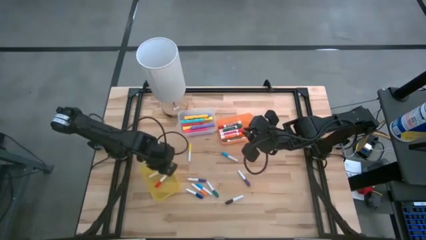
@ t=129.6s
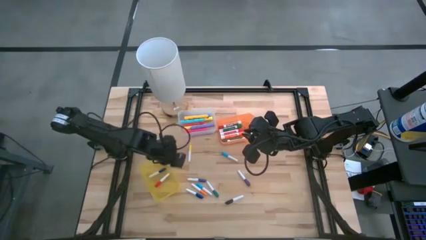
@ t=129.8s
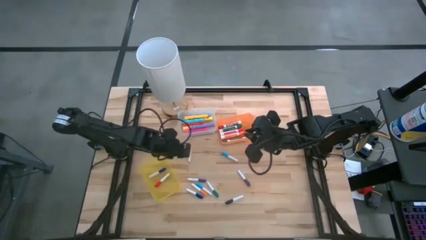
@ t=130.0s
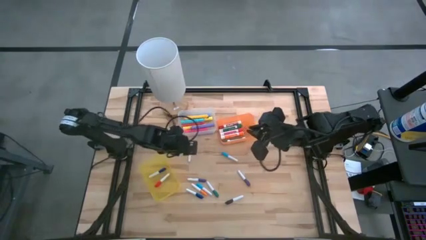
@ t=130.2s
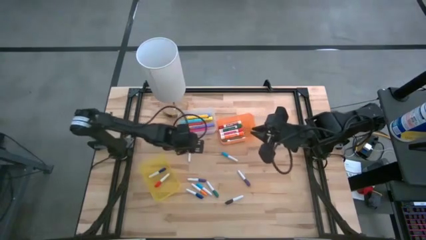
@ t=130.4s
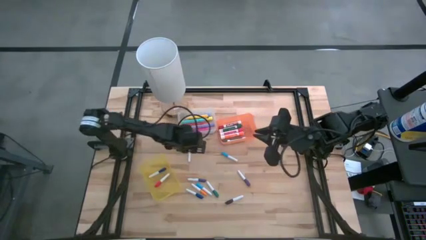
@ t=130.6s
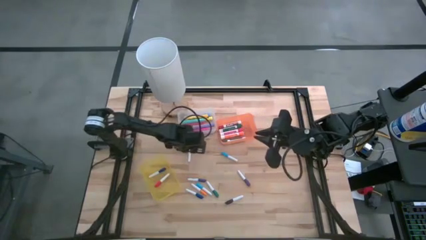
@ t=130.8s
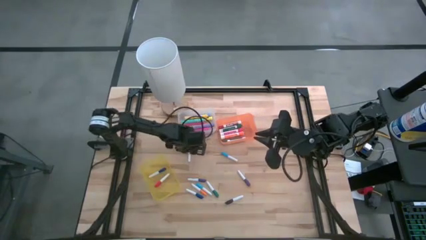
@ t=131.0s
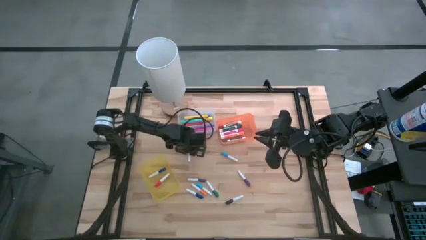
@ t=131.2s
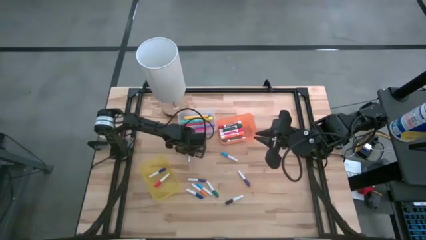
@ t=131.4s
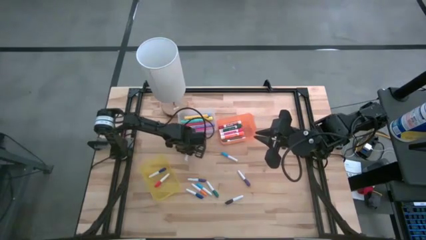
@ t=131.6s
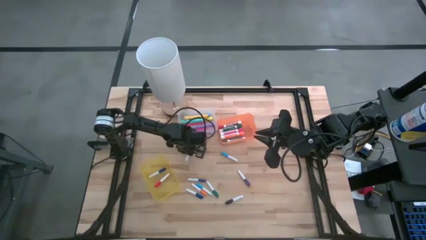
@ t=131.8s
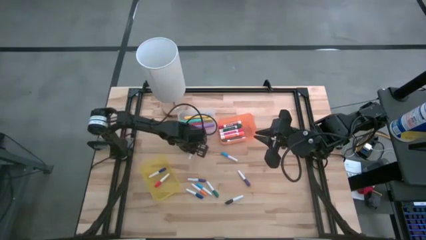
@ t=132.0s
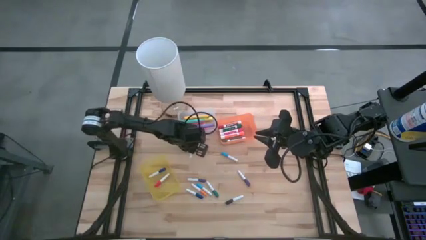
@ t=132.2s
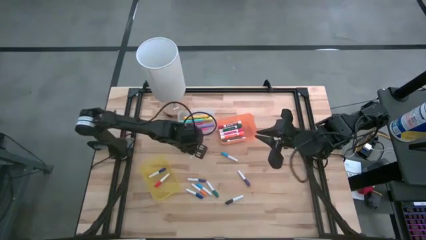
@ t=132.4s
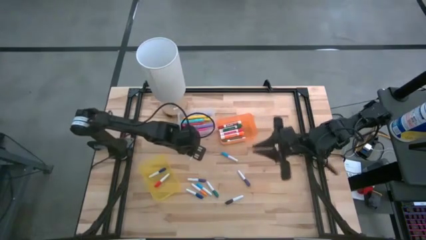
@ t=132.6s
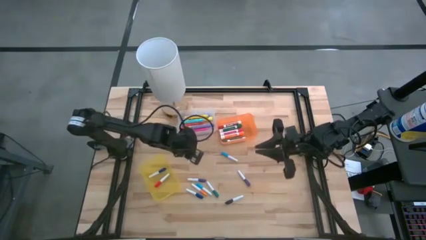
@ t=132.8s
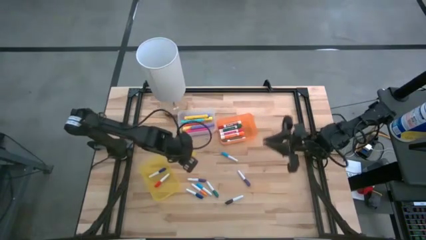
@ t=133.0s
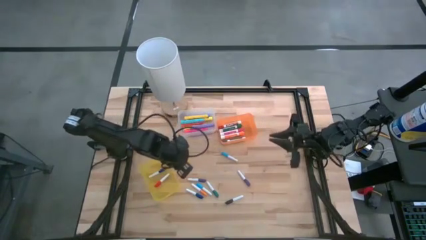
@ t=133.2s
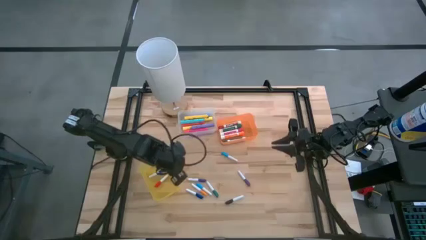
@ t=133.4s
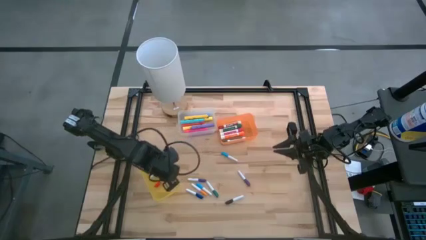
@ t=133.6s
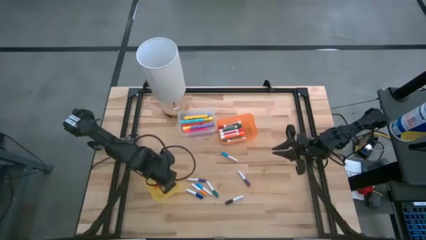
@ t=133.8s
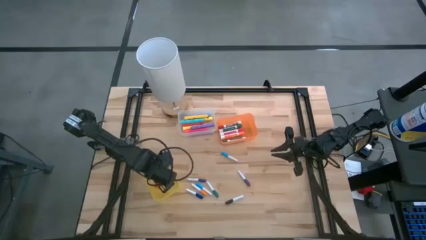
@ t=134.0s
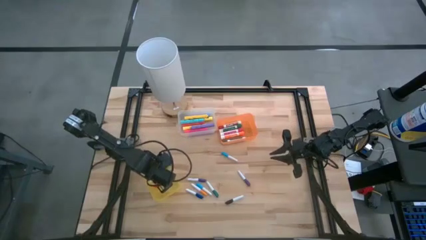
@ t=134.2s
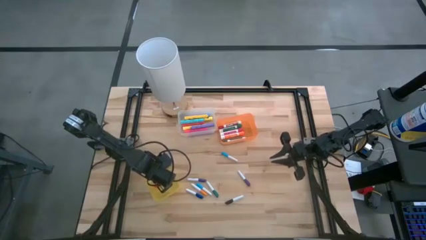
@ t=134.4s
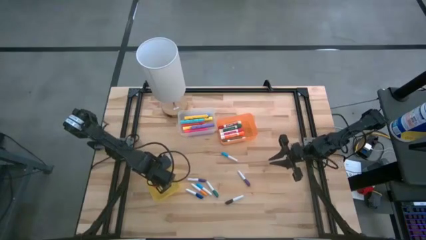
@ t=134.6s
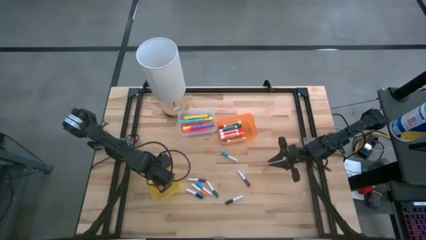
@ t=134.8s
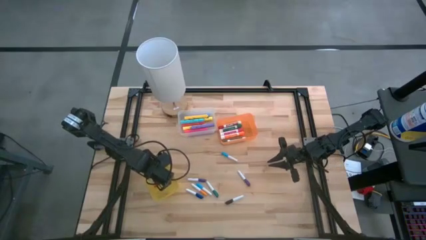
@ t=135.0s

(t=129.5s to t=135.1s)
Task: Pick & Place Markers
Put the yellow pen into the yellow bin

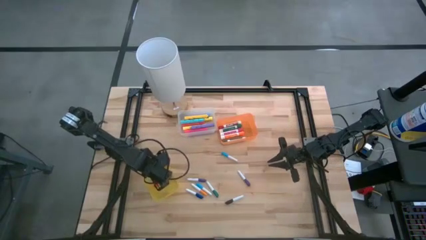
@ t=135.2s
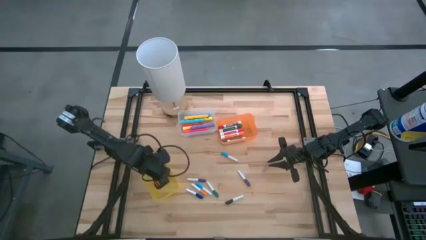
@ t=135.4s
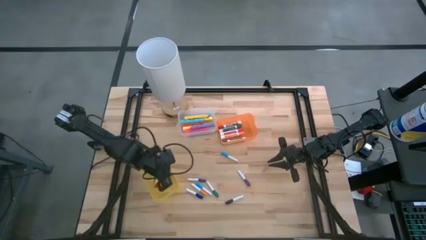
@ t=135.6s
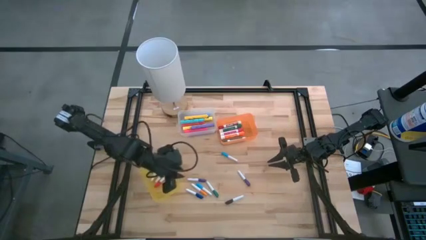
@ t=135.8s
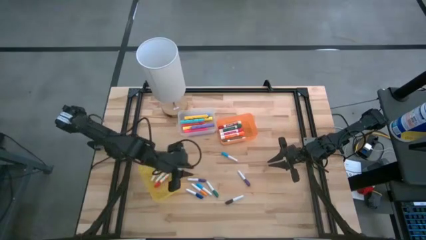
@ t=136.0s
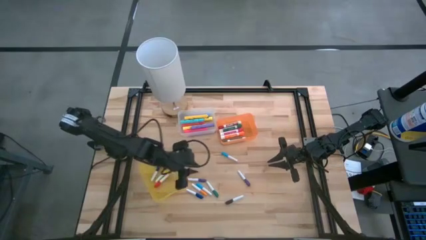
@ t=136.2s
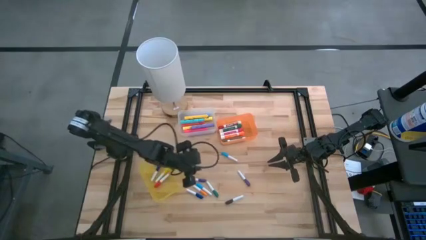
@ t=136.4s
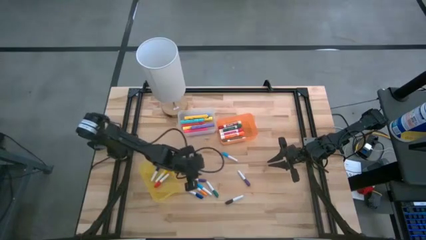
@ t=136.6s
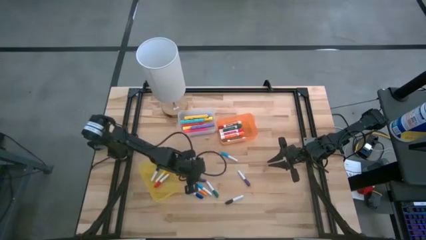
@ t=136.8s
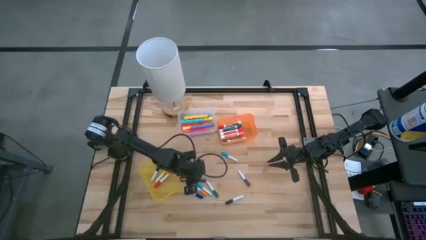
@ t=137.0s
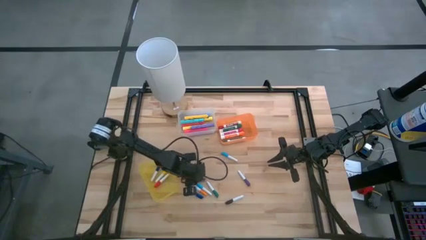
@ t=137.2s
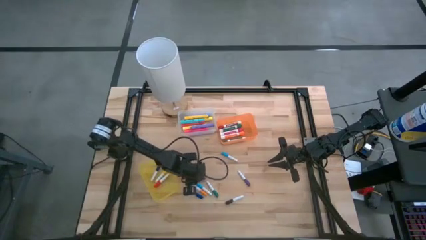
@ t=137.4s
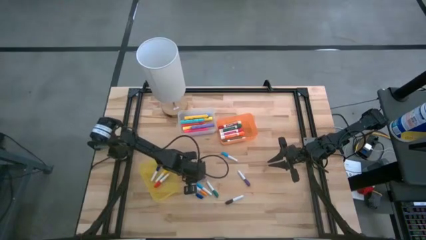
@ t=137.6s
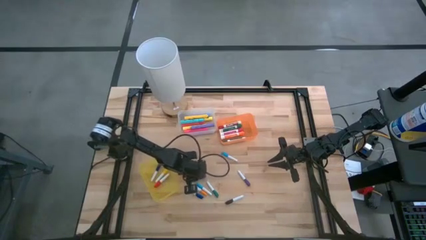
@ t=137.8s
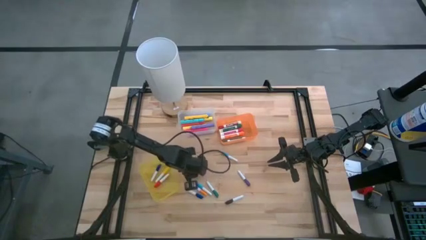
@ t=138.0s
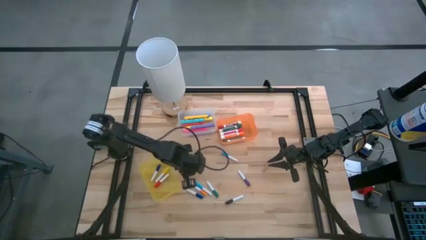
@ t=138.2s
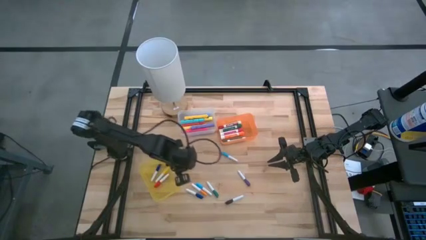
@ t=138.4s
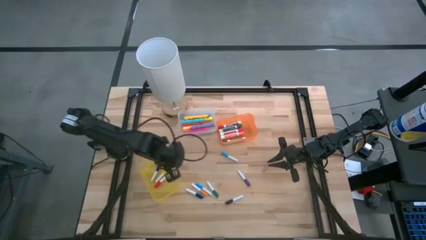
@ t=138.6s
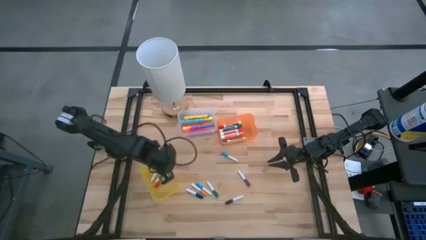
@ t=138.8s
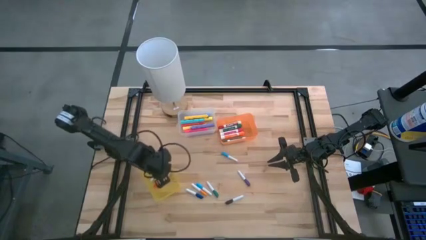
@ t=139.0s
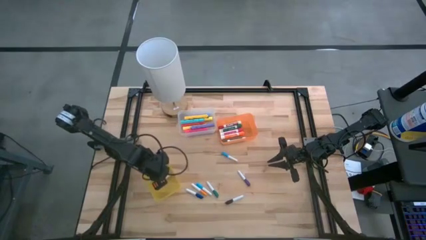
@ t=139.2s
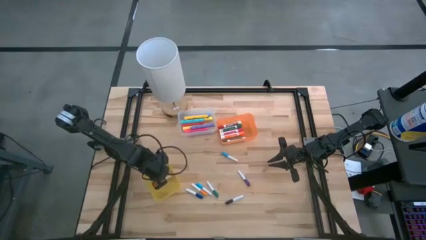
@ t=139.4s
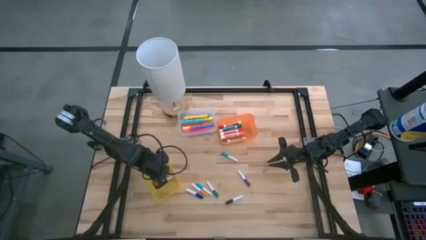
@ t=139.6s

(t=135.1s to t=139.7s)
Put the left purple pen into the yellow bin

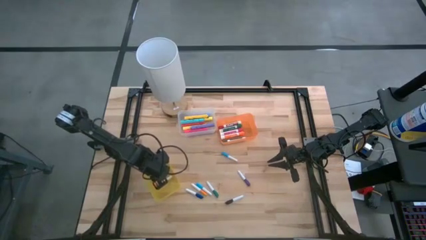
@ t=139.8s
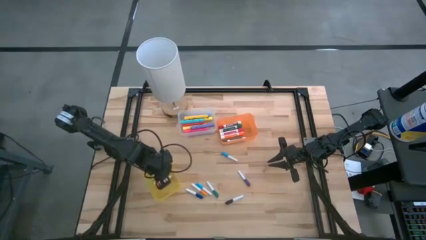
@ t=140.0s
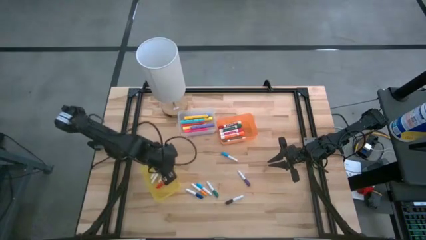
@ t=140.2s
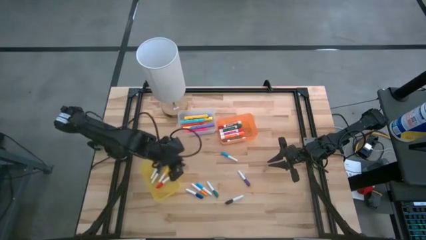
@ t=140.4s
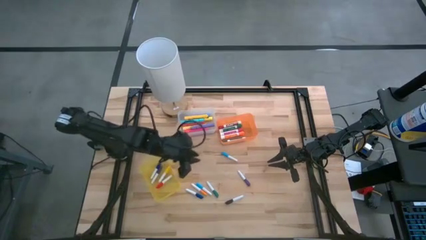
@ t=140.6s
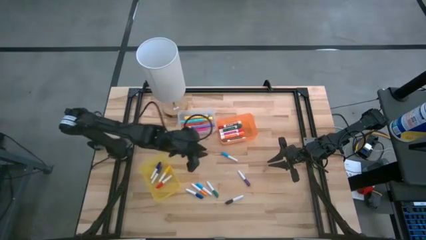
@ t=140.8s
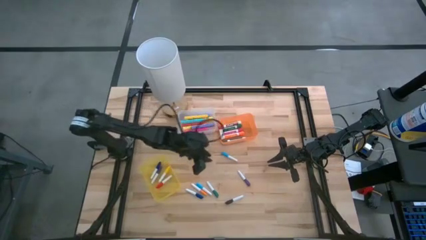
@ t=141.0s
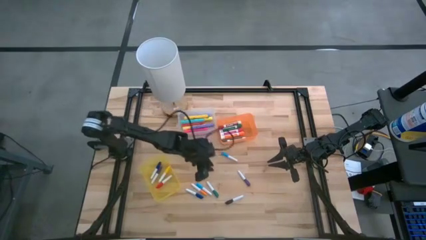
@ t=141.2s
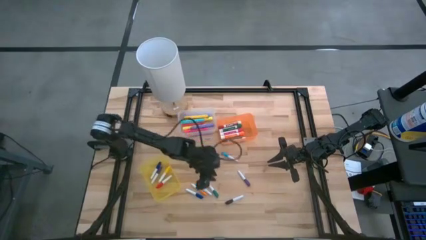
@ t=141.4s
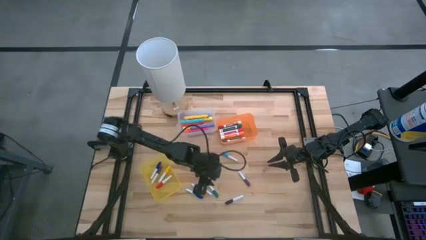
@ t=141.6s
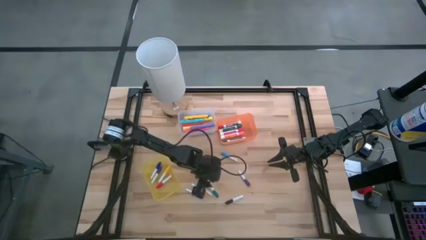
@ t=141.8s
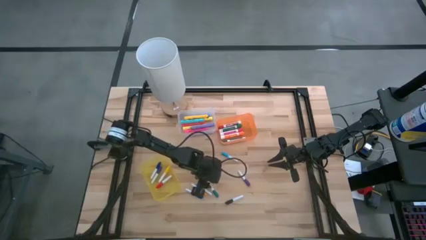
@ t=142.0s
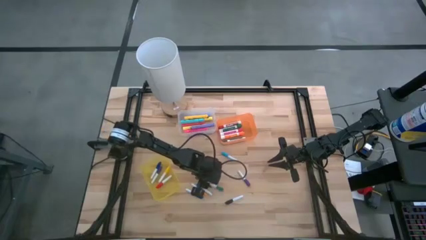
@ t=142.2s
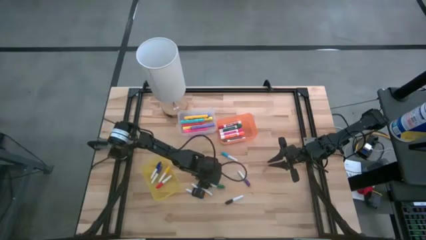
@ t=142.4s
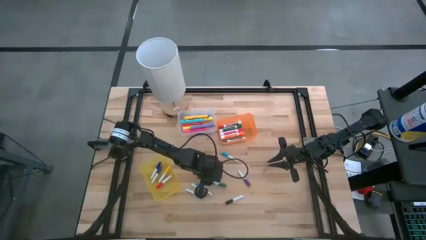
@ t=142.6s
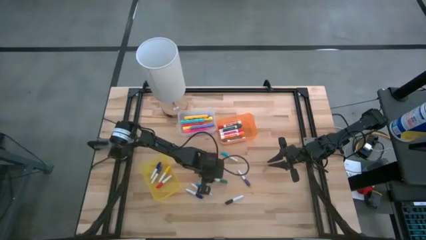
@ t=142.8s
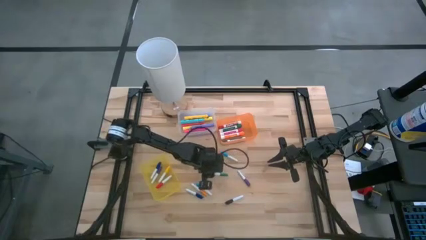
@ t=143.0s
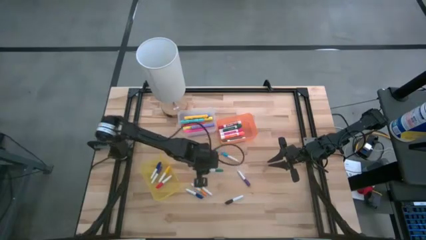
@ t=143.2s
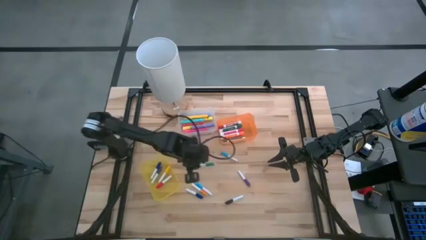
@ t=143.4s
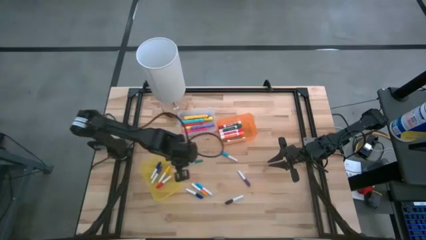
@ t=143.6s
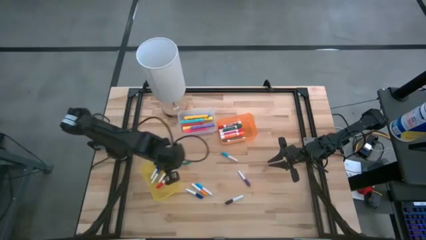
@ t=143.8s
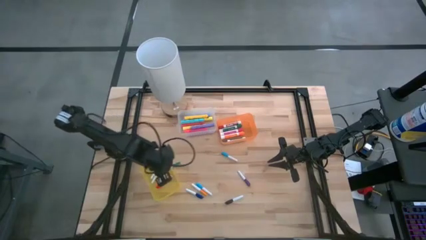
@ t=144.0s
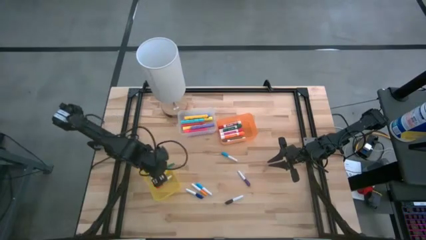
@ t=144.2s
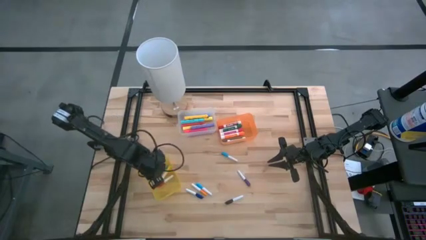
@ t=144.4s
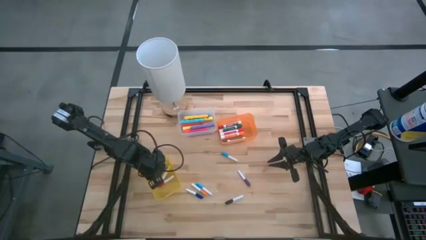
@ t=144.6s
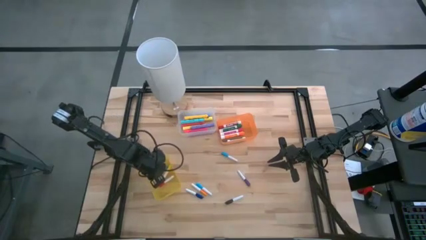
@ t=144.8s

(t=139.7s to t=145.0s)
Put the dark green pen into the yellow bin
